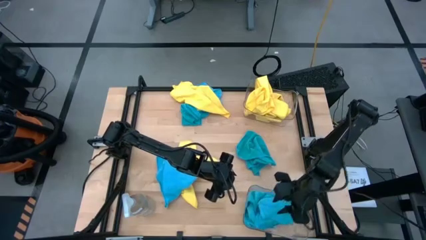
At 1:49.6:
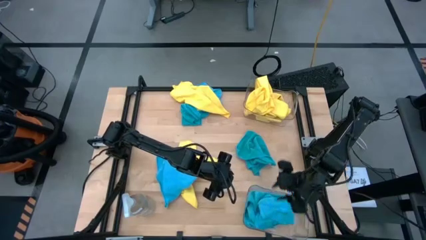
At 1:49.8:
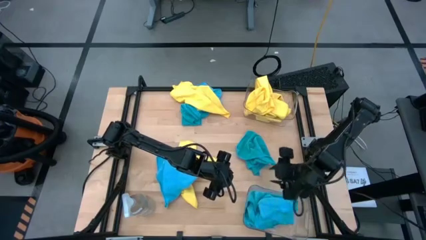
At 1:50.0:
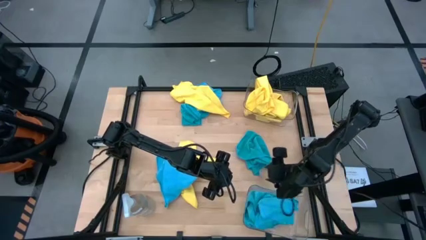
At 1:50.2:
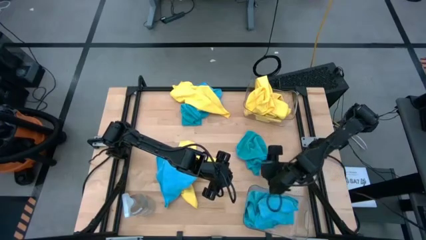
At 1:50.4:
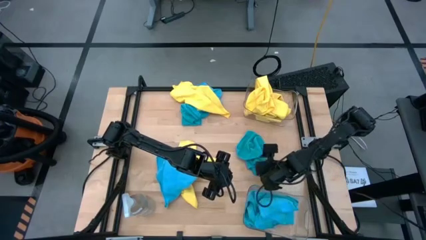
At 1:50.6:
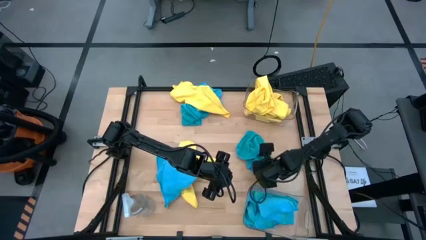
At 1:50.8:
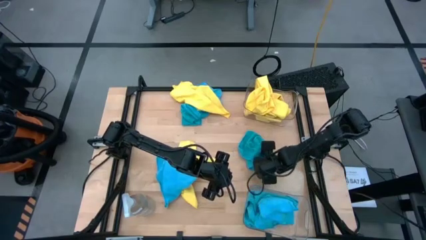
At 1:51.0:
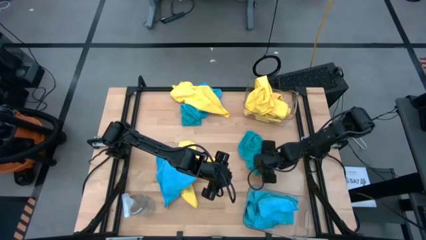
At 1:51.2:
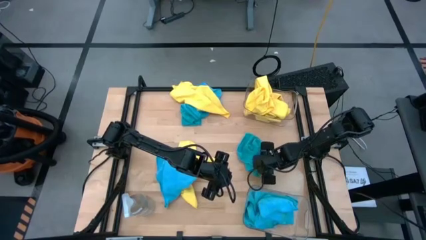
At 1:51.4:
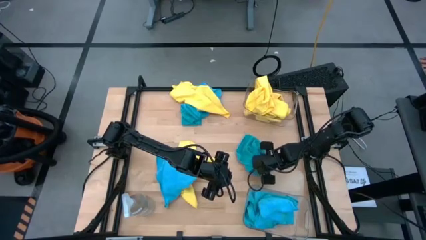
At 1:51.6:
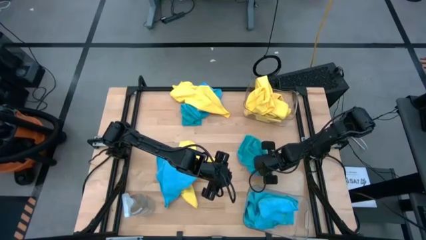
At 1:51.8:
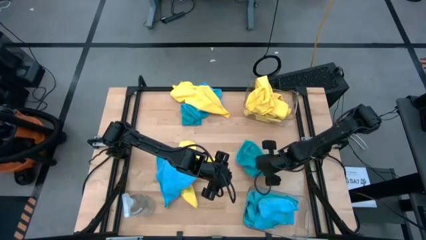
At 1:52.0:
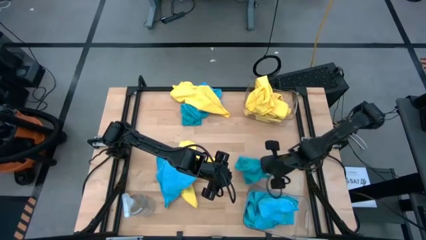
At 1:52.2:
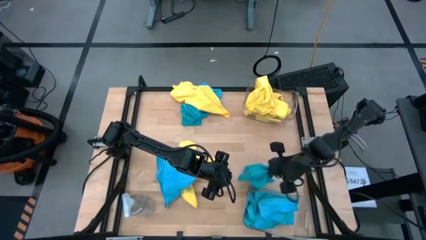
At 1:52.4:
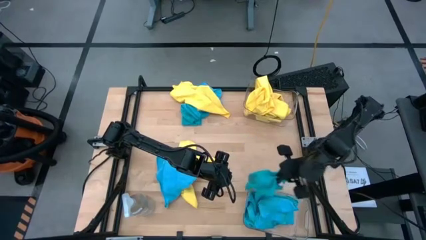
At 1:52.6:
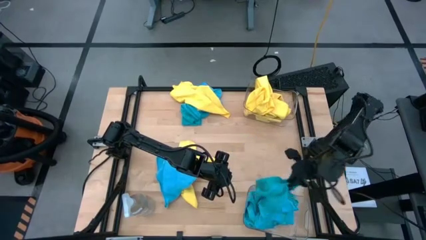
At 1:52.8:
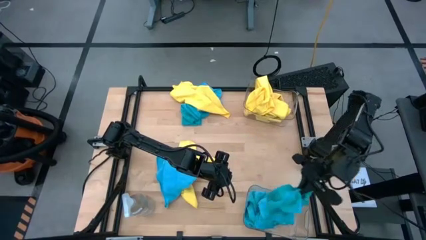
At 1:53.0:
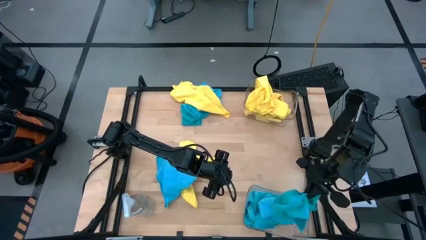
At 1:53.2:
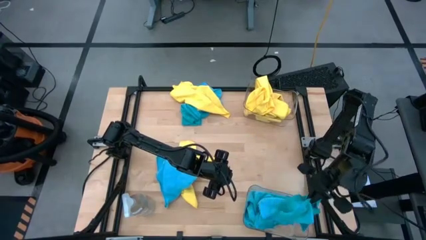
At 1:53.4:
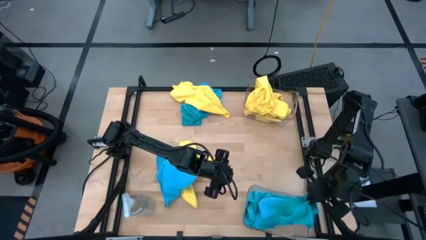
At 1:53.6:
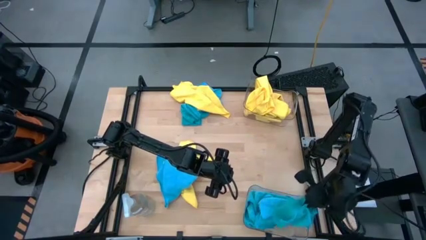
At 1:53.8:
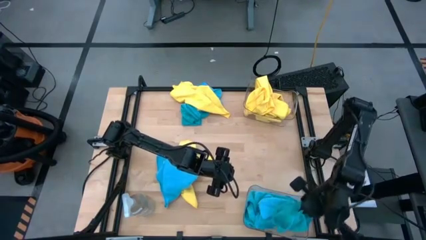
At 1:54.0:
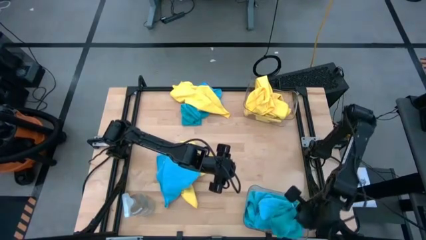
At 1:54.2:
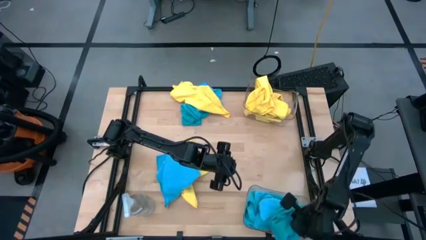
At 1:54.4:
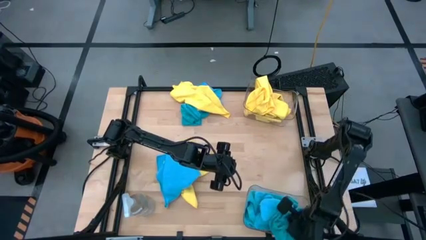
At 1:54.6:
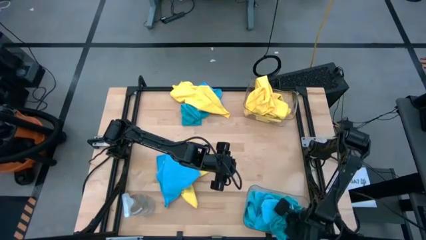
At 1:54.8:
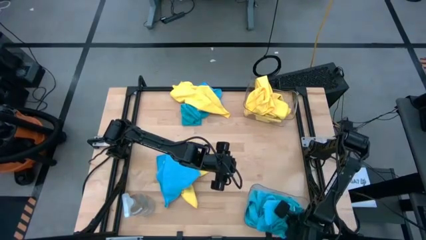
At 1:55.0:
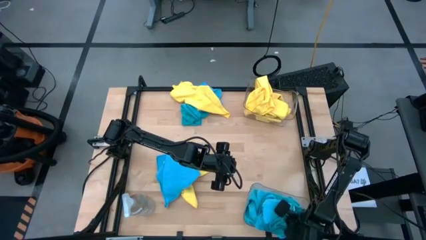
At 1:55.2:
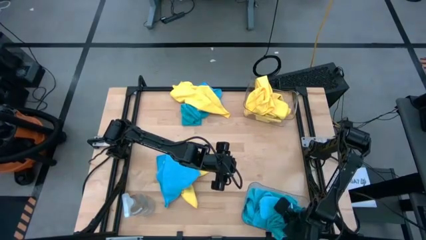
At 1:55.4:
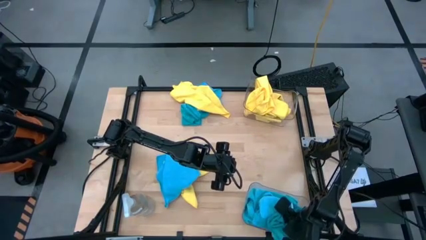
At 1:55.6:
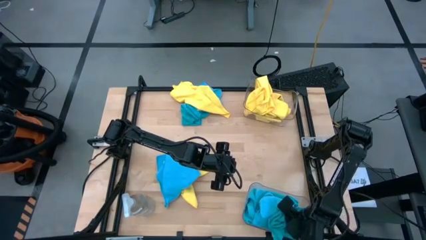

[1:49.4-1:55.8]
Task: Sort microfiber towel by color & place in baskets
Put the blue microfiber cloth into the bottom transparent bin

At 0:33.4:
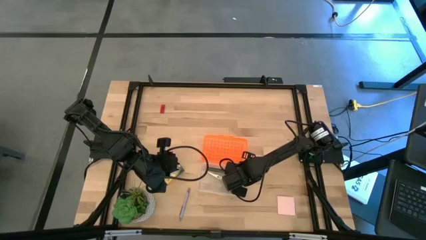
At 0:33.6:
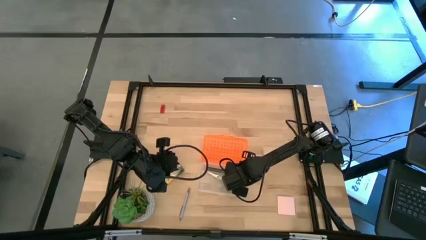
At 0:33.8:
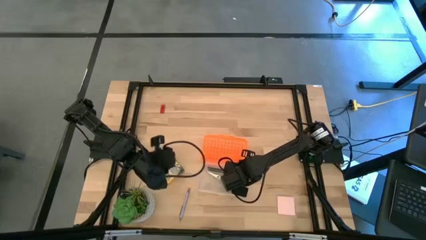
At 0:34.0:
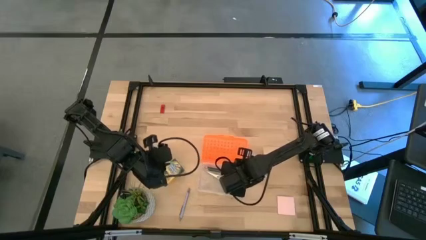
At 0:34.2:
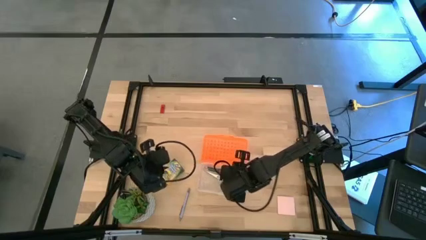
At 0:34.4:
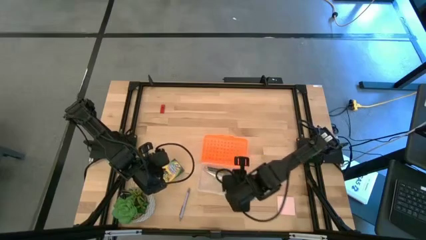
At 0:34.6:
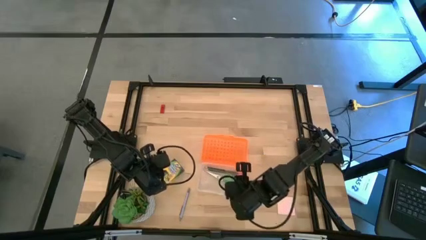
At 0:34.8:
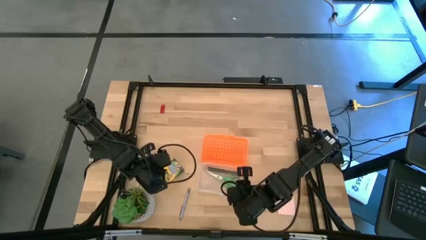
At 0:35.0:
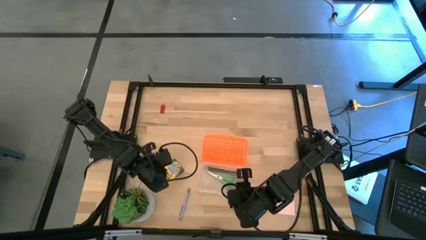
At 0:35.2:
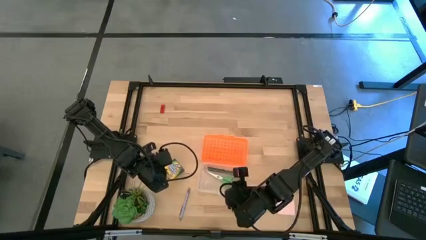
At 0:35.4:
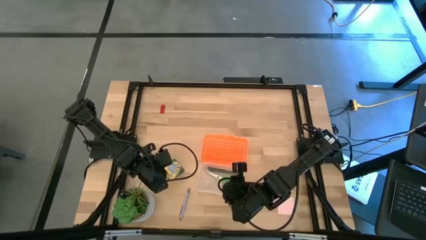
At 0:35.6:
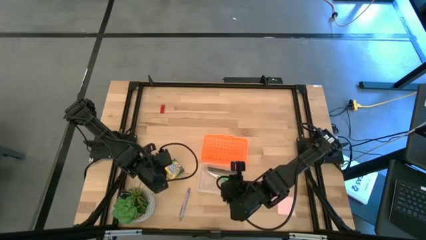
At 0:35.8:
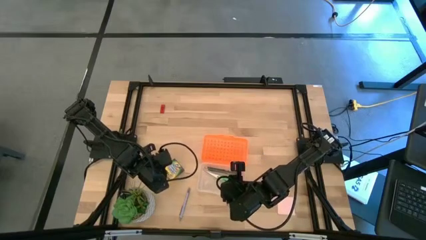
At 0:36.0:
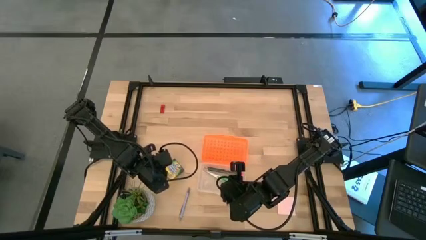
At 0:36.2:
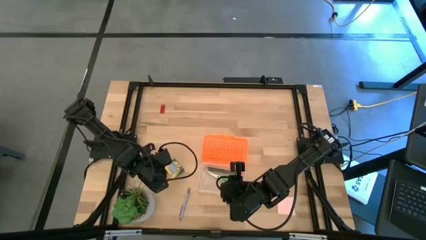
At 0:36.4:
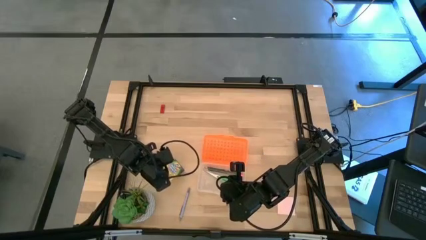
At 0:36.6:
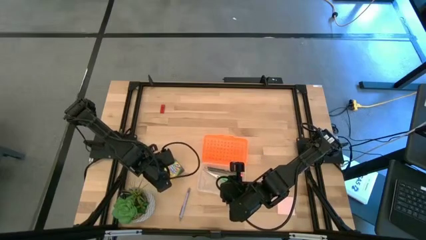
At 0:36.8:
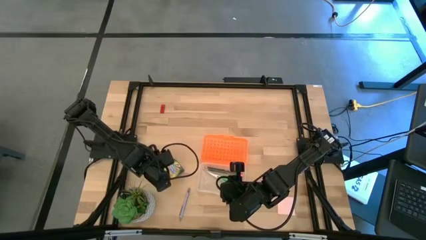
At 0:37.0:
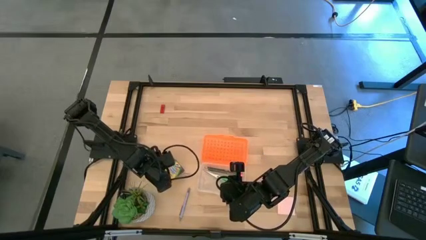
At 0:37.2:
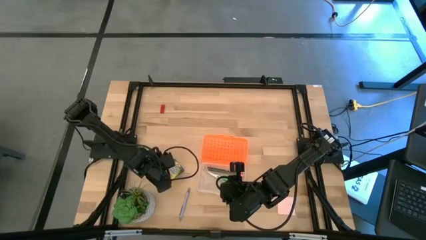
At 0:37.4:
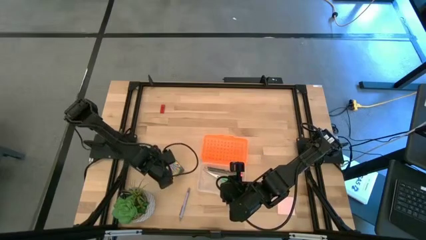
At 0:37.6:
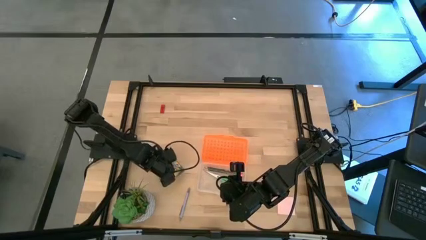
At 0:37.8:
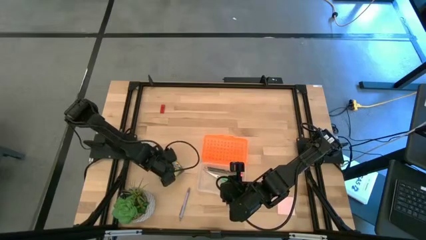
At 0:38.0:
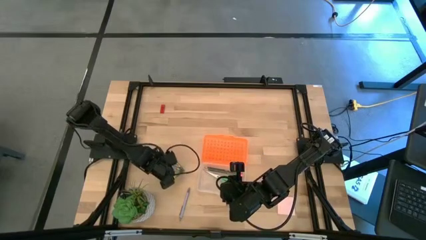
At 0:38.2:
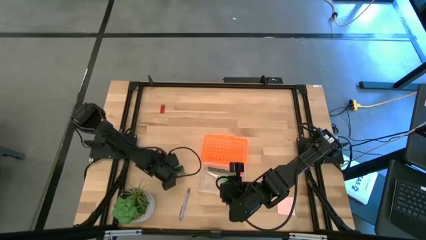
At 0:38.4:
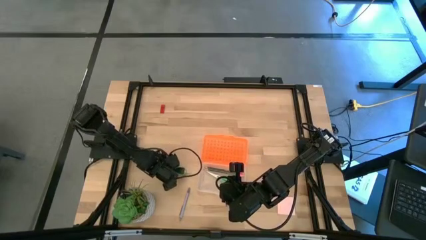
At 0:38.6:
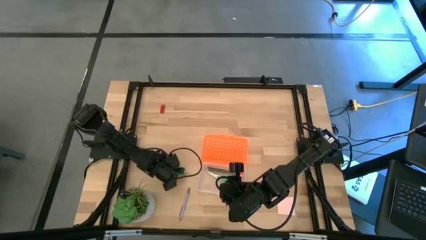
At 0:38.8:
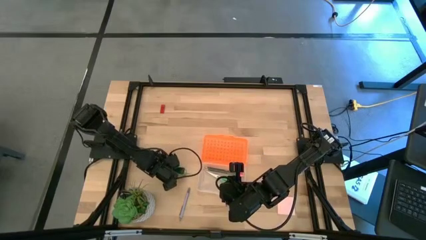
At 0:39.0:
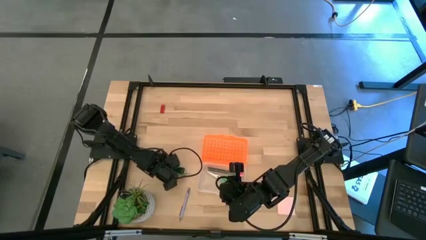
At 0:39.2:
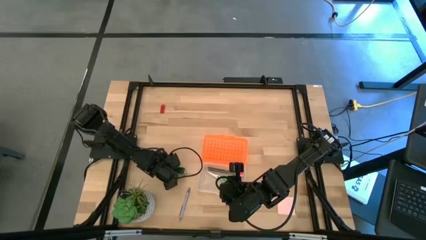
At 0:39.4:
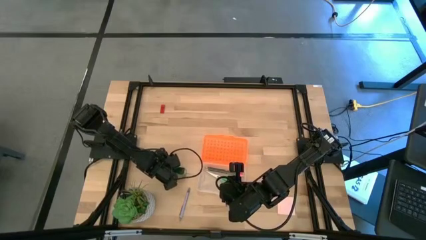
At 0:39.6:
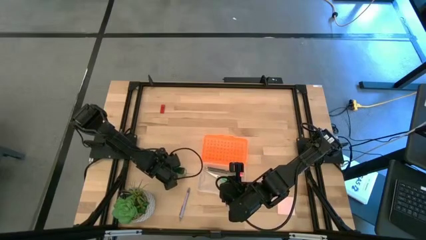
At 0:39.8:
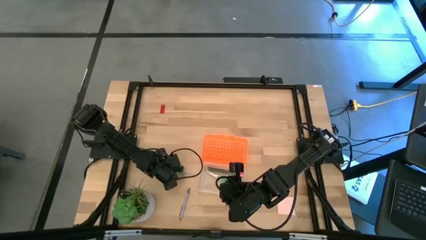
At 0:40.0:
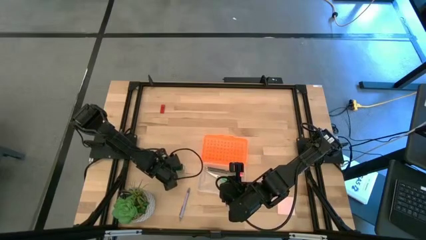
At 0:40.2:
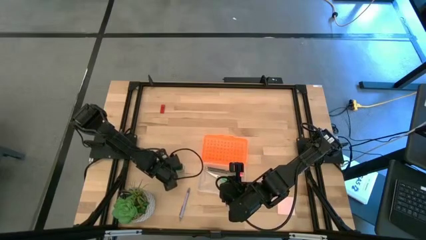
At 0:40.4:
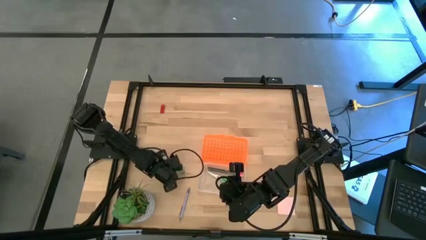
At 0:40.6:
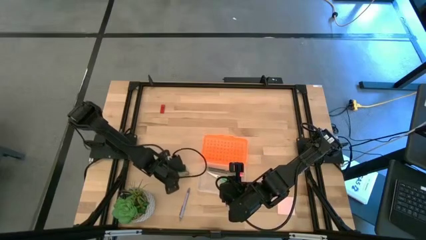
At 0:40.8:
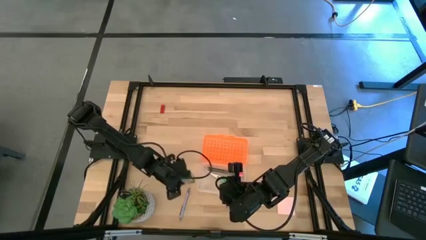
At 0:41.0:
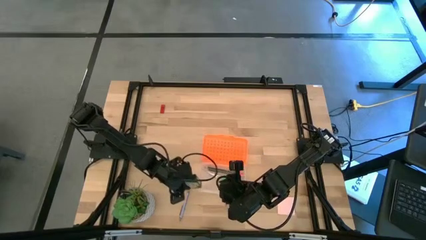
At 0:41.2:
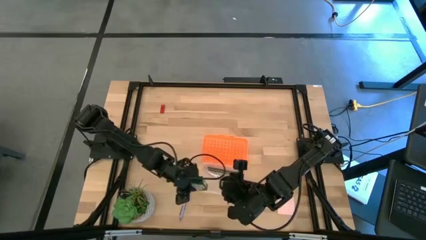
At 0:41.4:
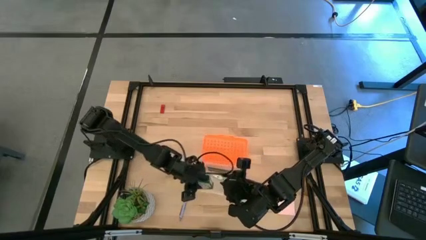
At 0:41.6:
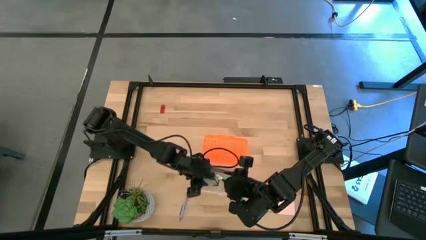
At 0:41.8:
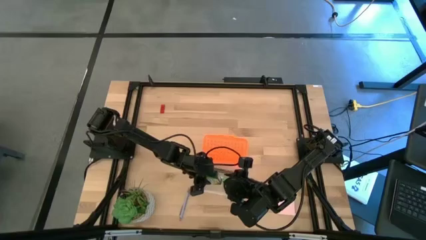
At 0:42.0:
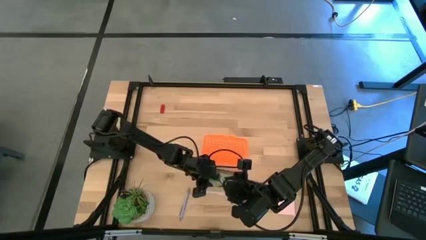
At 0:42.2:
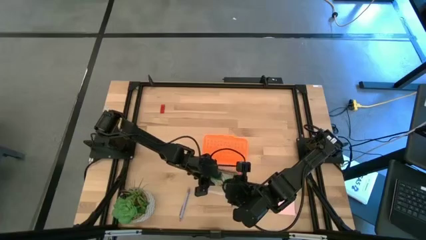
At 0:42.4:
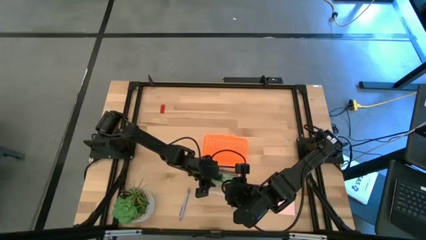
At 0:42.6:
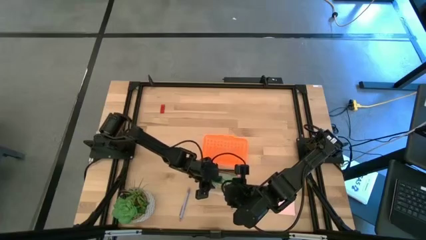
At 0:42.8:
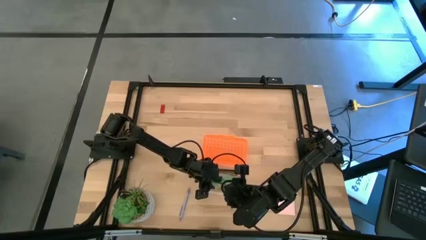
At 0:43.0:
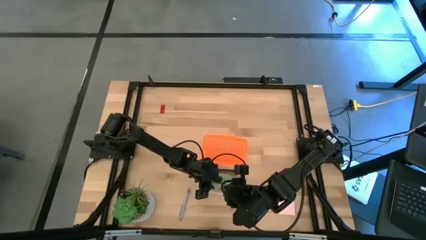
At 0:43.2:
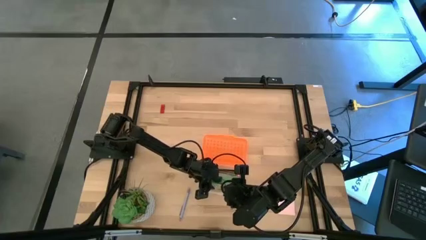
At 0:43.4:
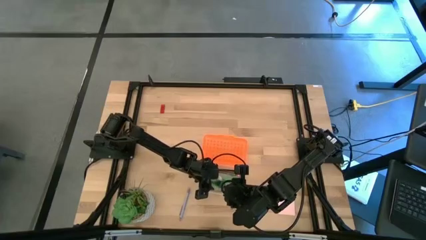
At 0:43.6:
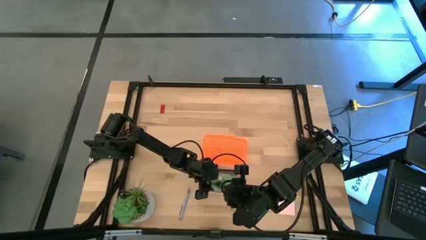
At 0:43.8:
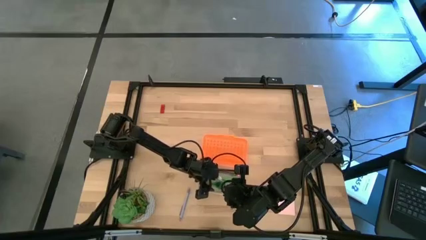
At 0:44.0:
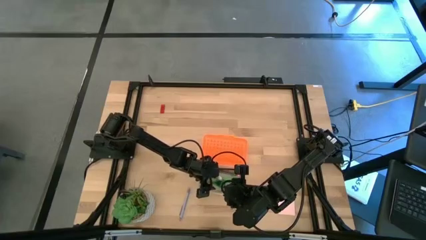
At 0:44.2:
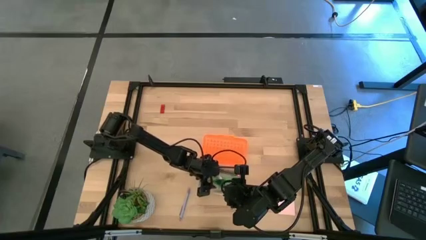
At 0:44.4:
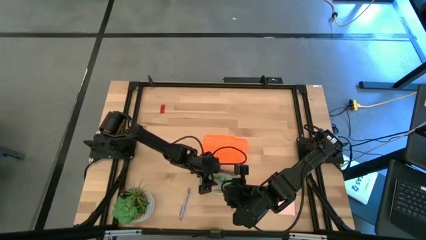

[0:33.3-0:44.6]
Task: Pack school essentials
Put the yellow crayon box into the orange supply box
